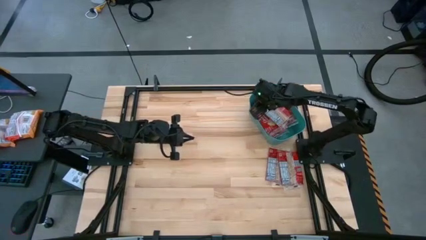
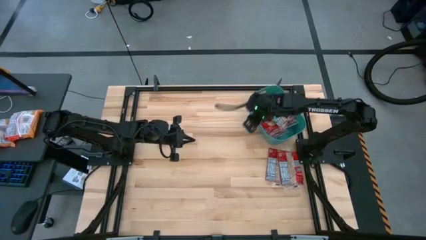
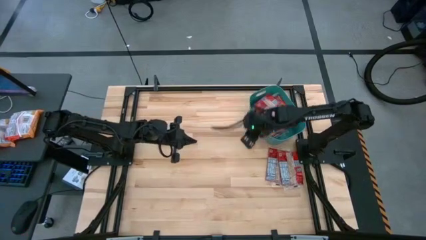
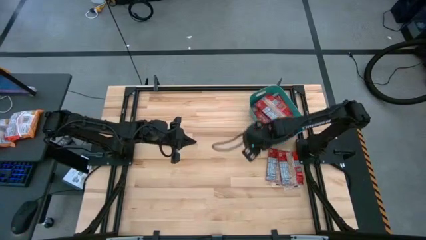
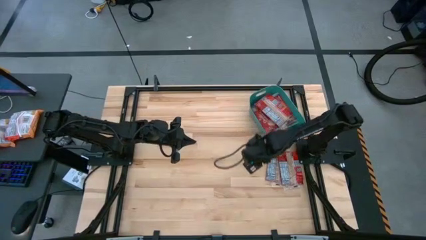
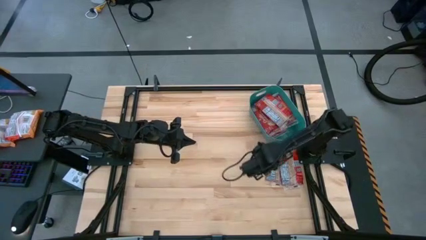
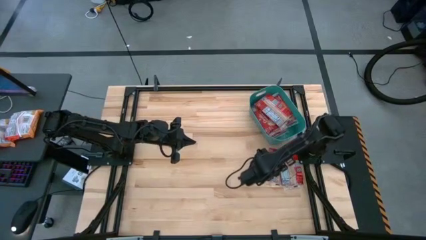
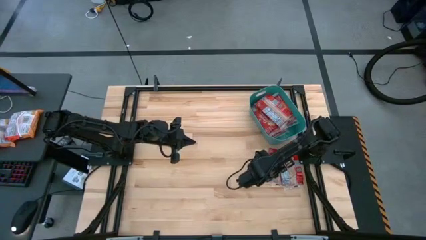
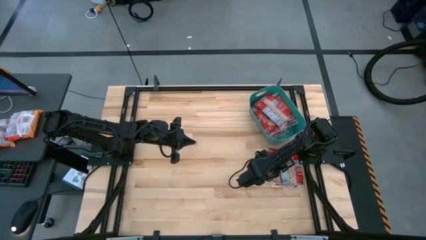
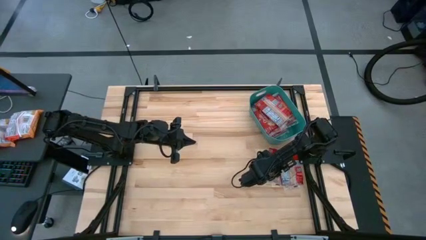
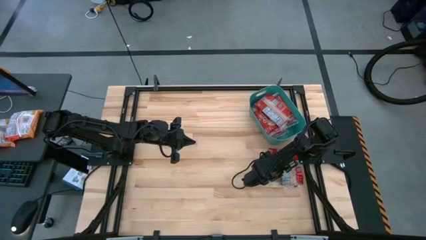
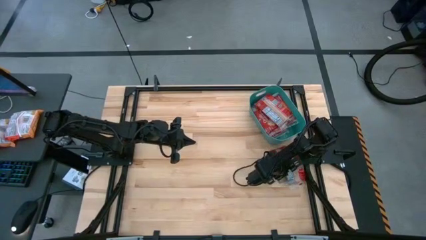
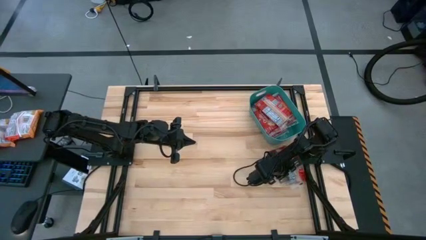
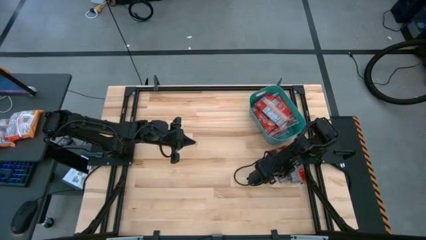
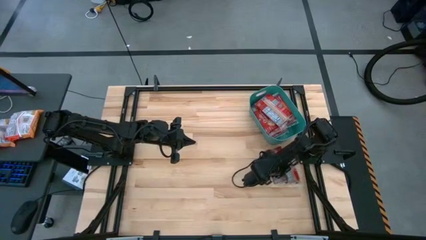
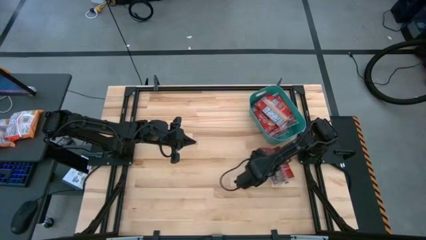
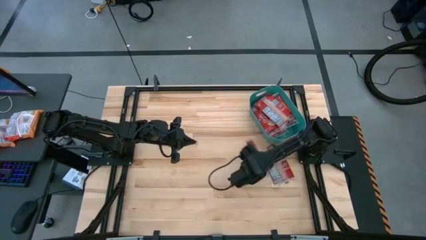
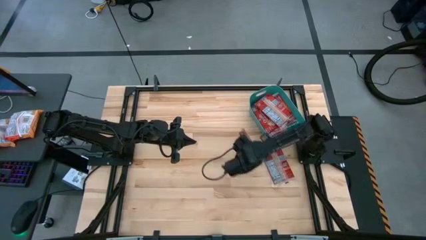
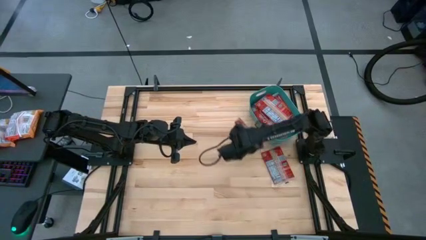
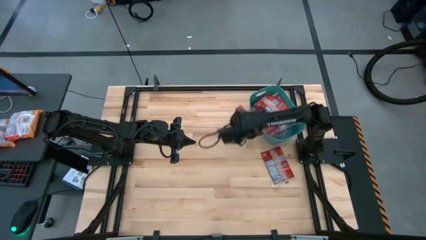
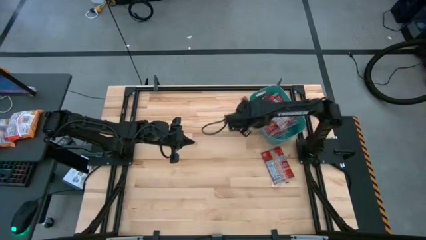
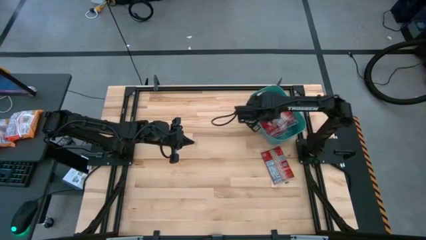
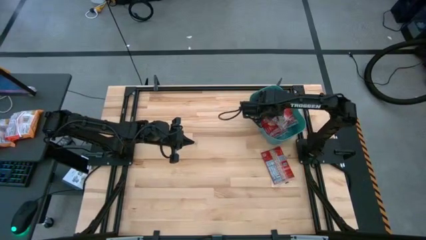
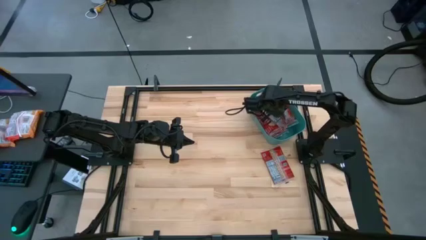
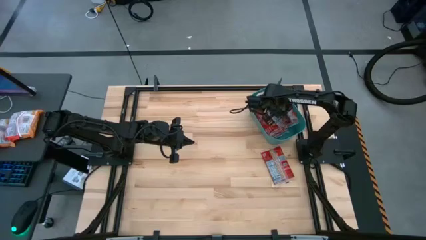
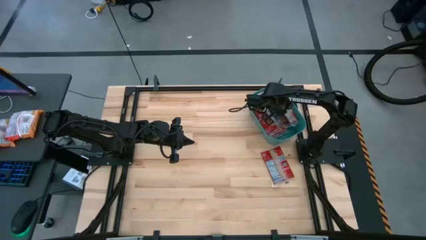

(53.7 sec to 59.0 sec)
Task: Sort popcorn bags into baskets
Put the red popcorn bag into the green bin

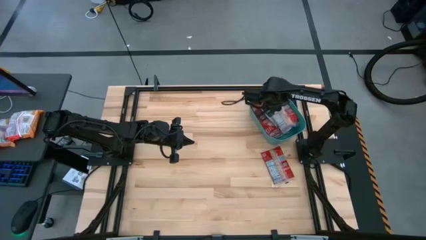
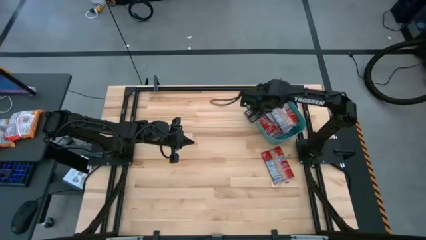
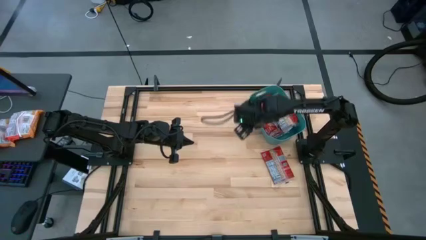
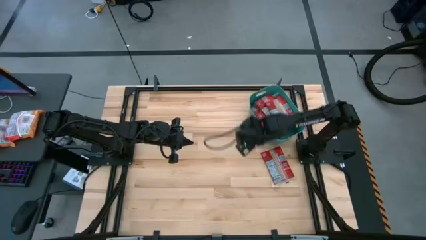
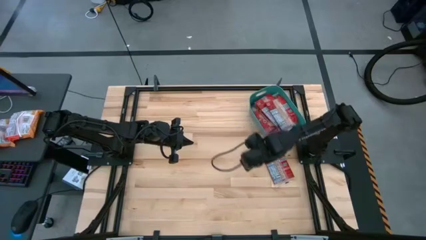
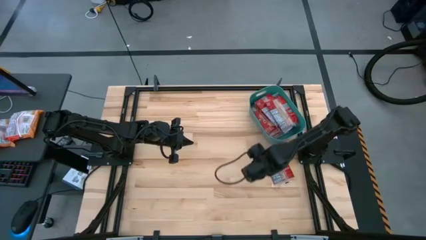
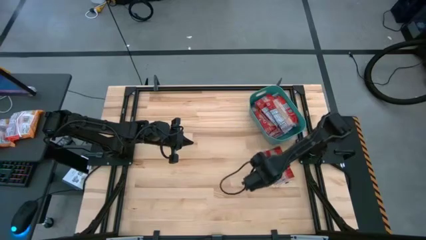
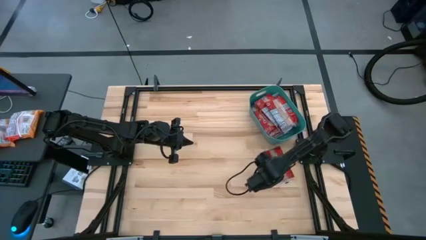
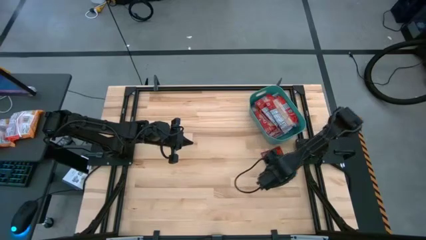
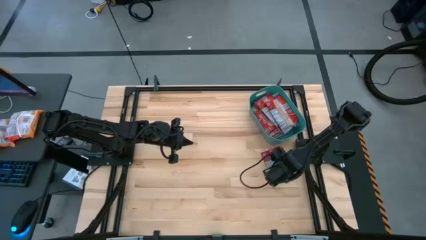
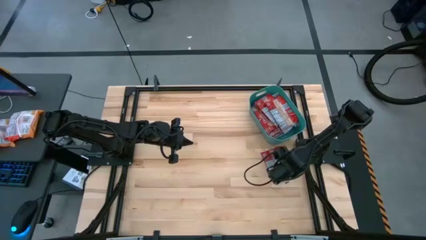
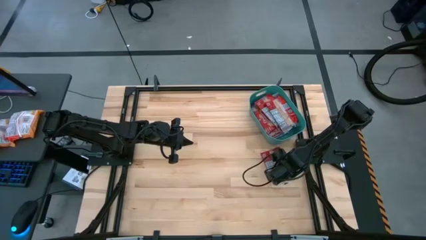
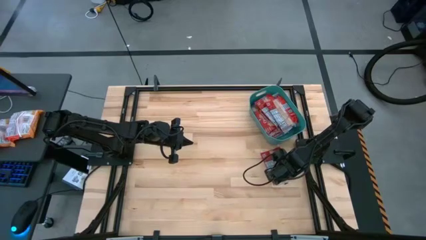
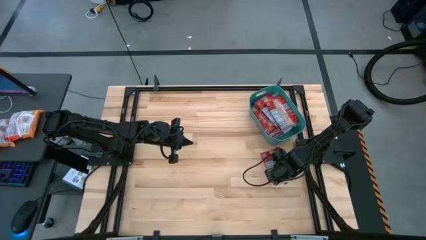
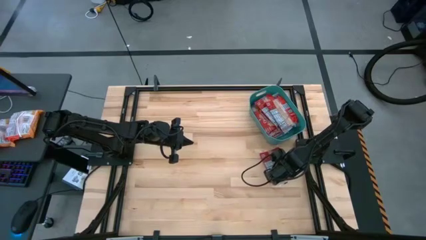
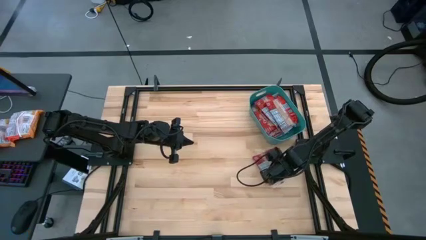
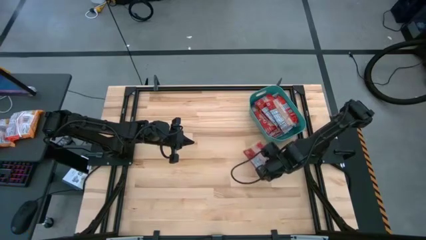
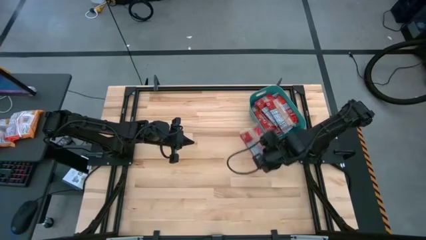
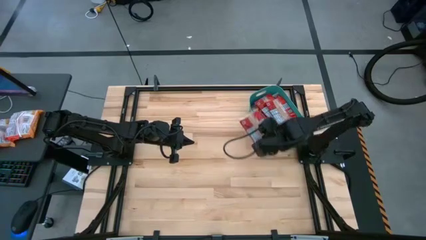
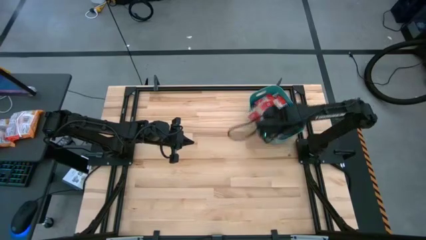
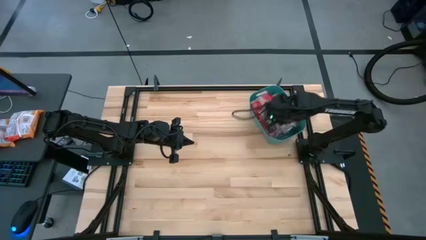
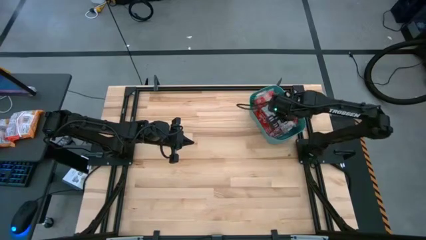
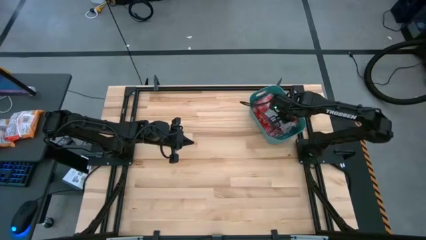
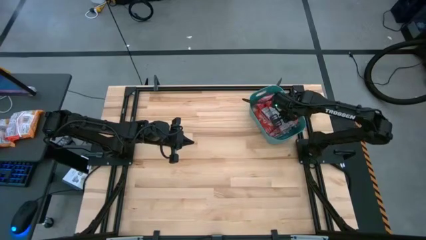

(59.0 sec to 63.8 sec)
Put the red popcorn bag into the green bin

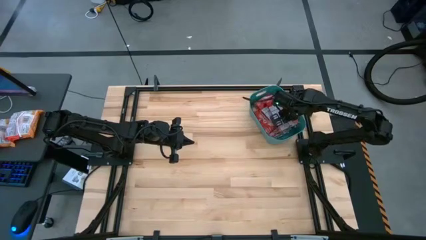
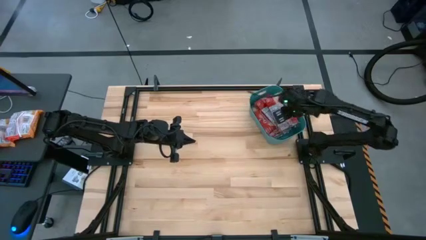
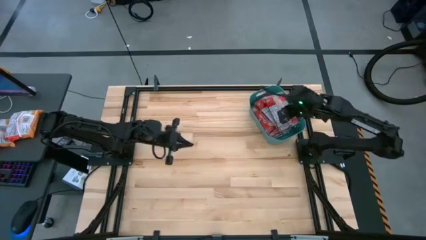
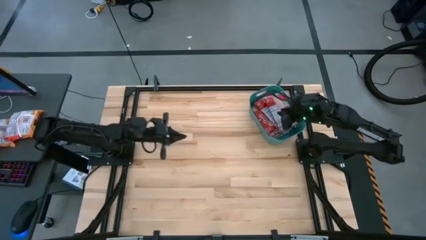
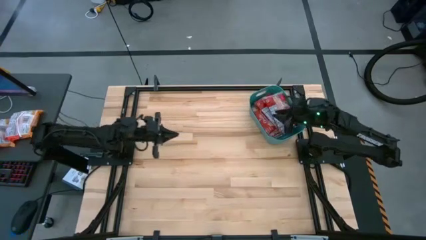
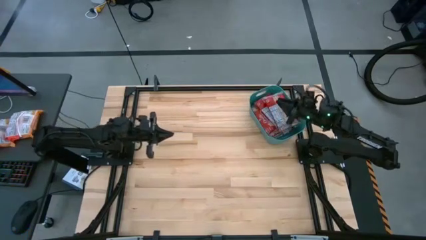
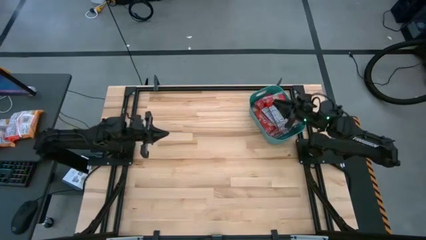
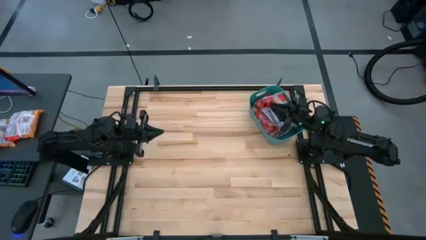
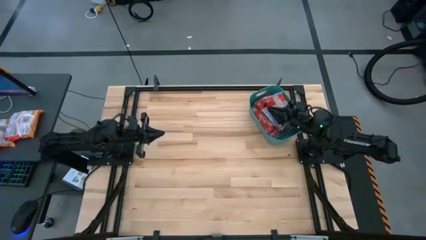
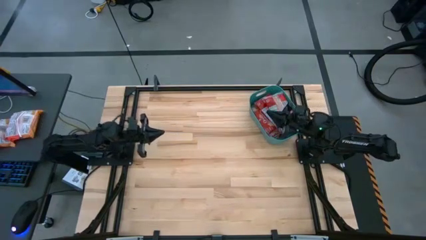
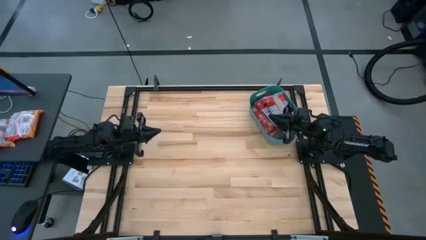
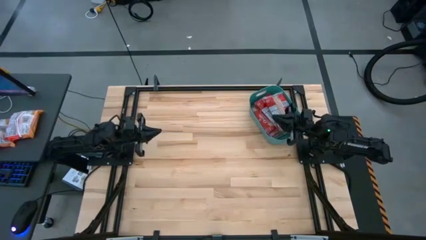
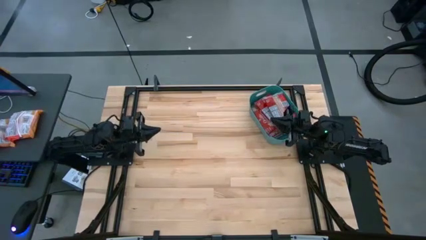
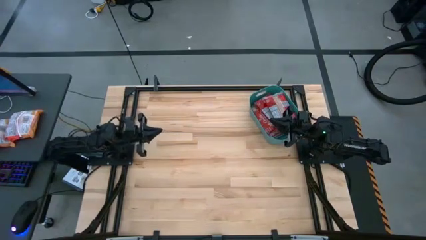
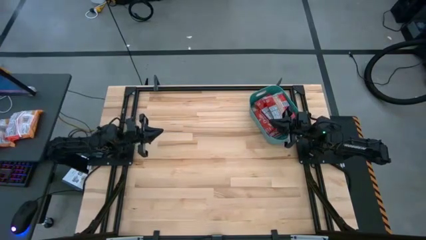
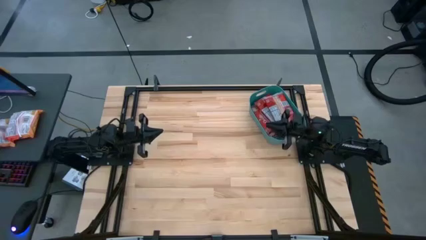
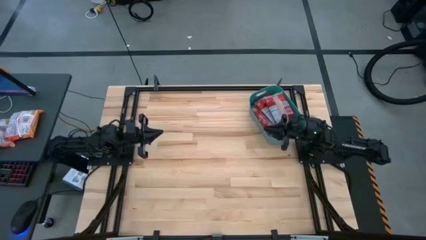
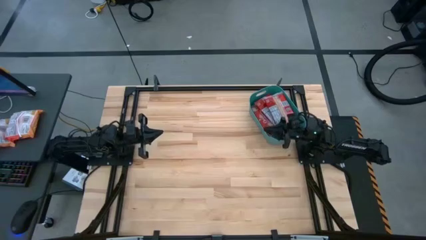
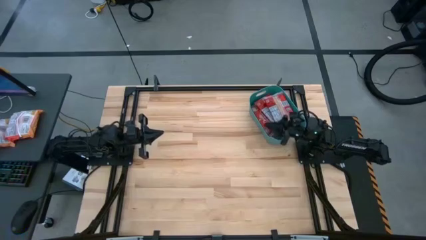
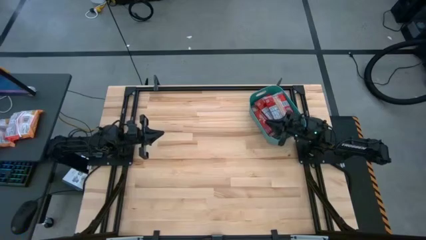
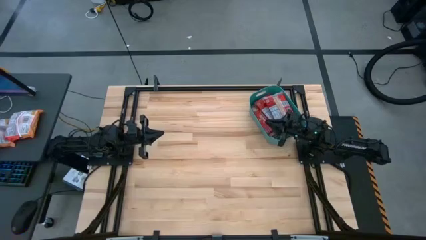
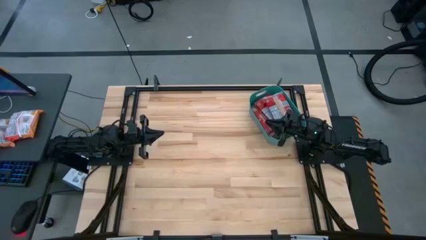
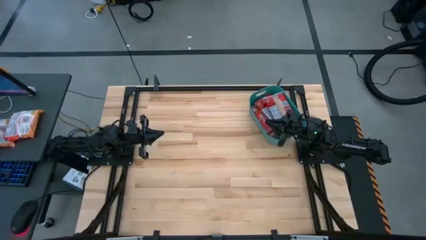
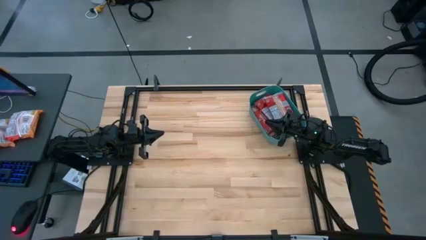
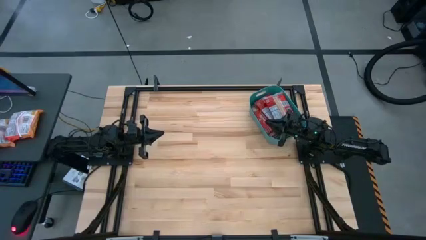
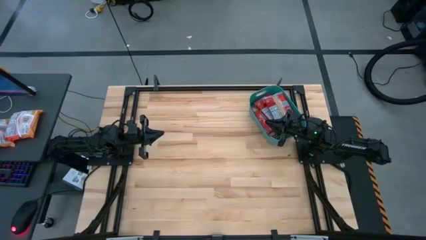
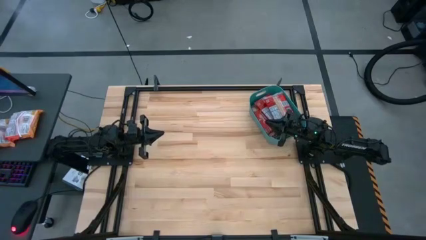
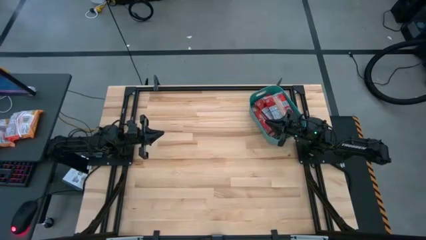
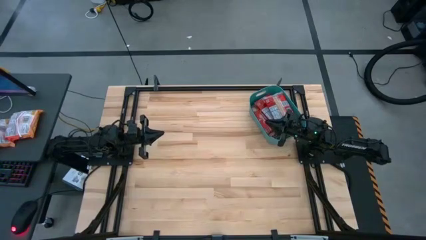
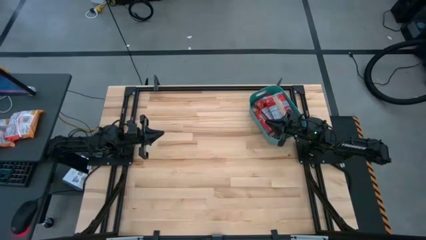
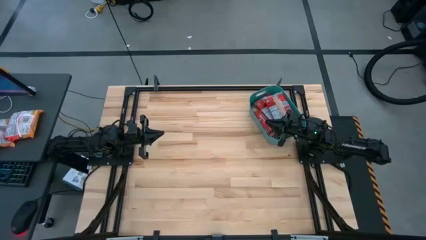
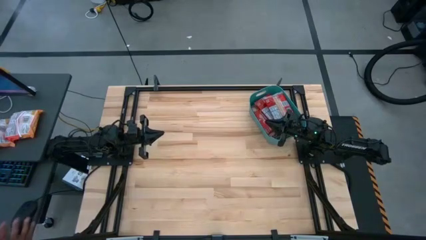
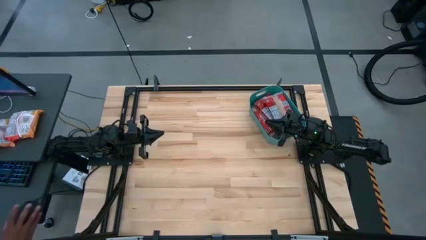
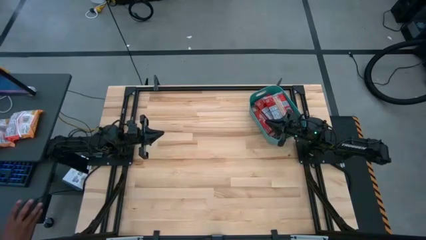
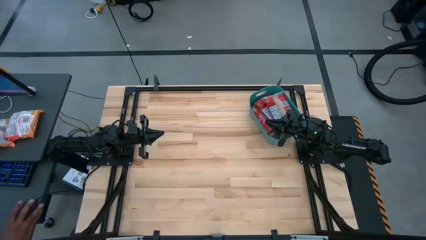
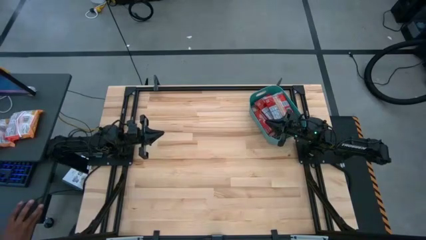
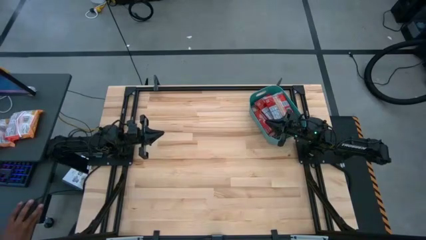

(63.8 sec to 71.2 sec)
Return to Home Position
